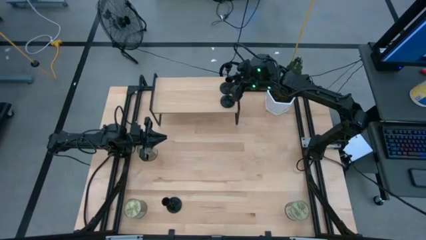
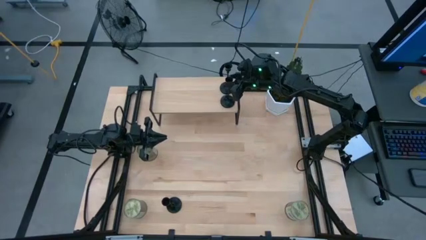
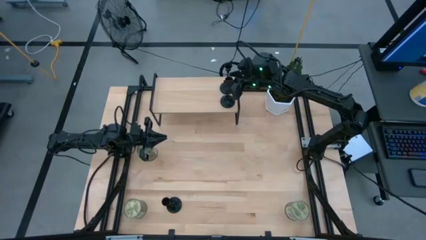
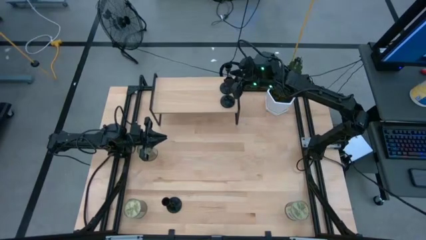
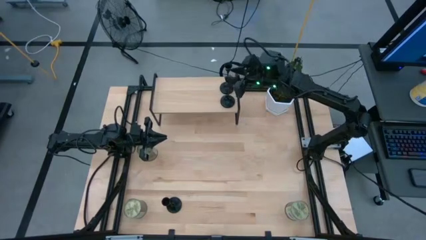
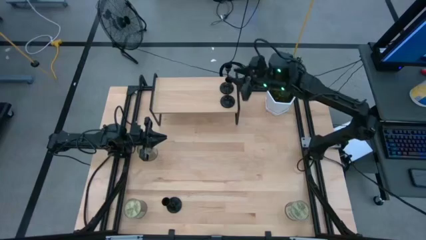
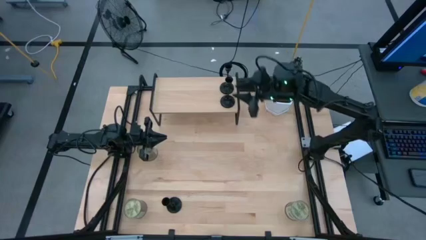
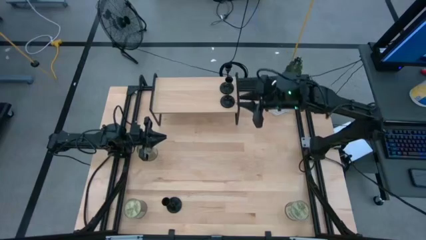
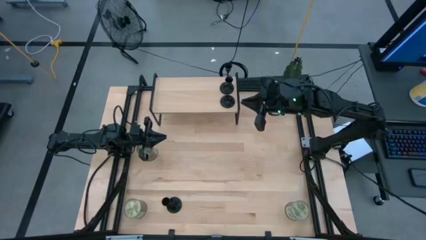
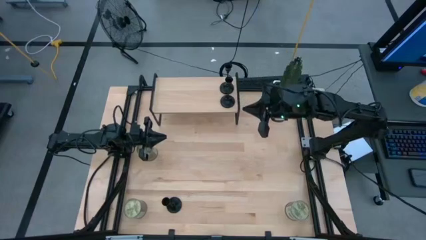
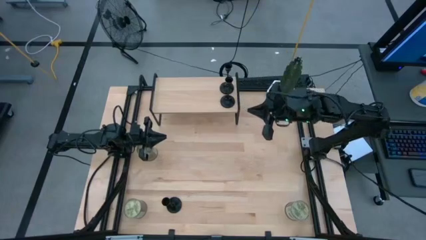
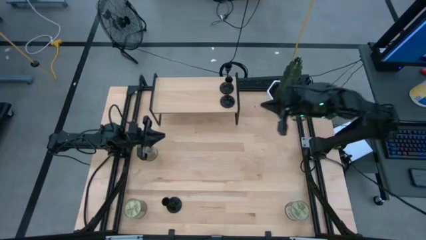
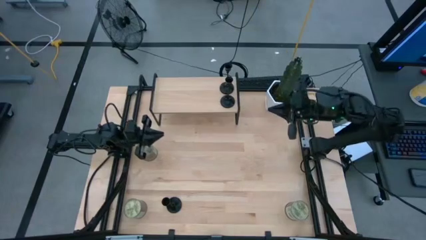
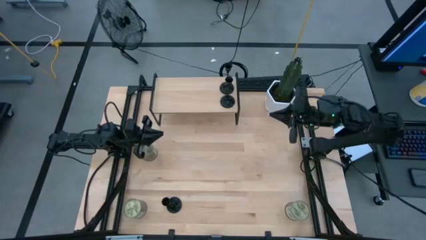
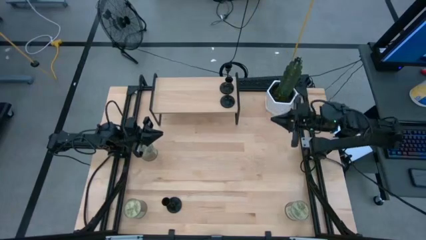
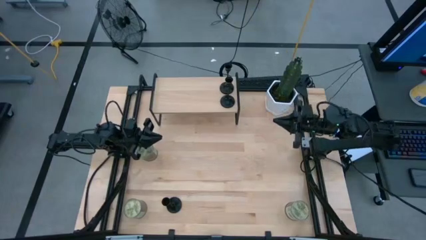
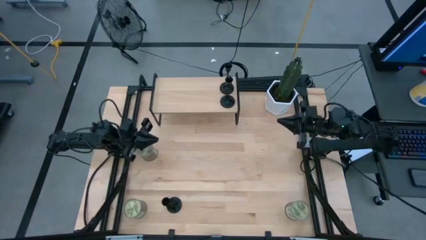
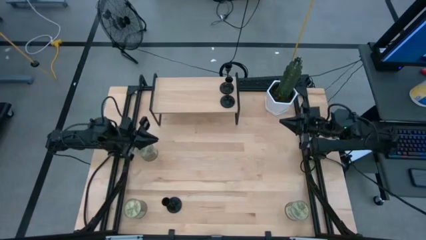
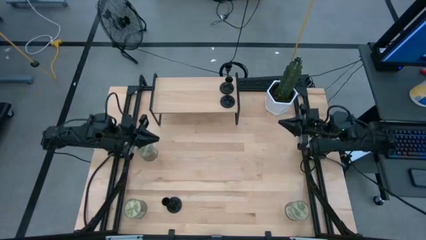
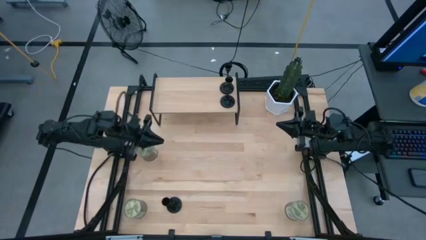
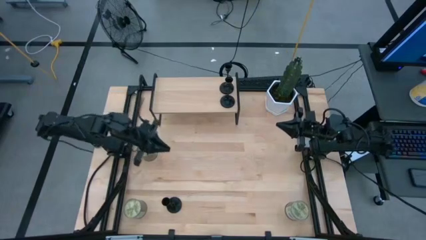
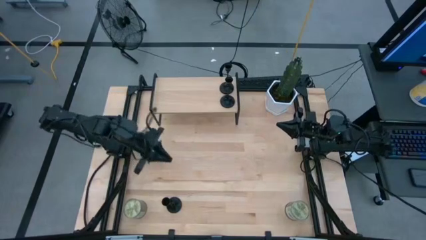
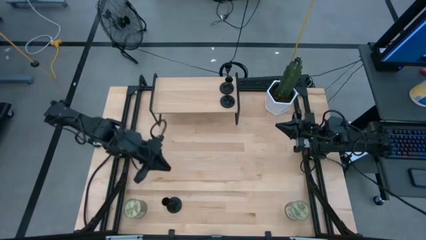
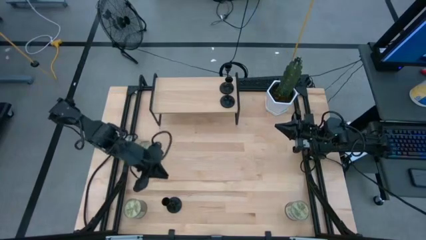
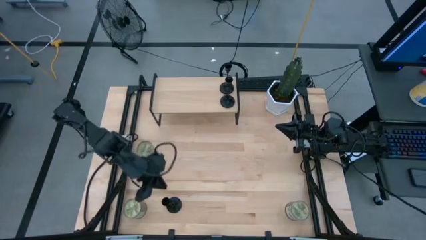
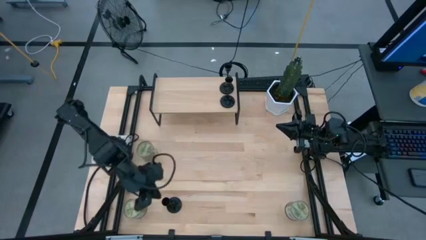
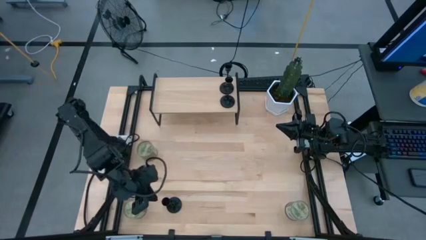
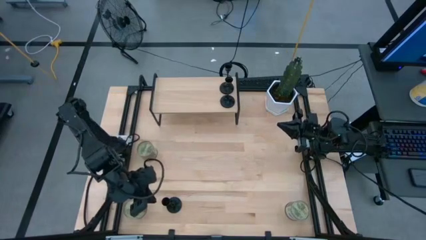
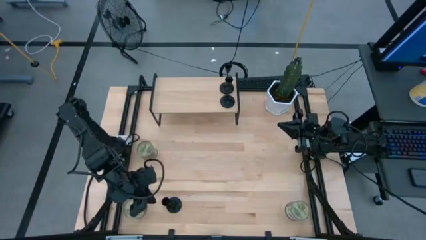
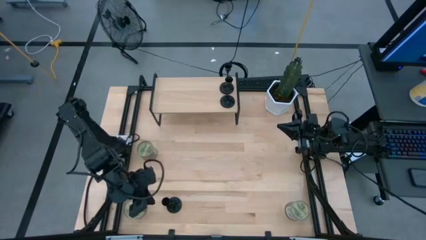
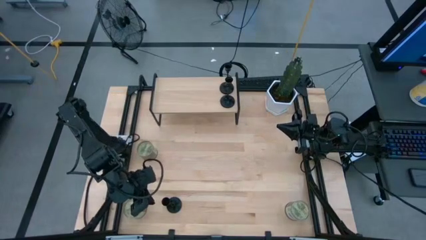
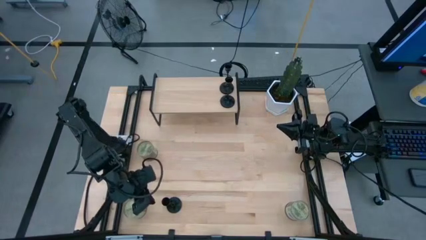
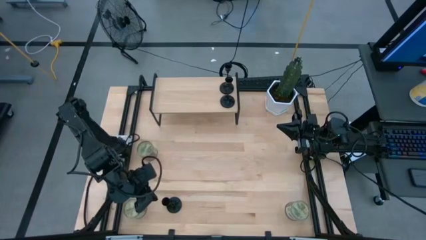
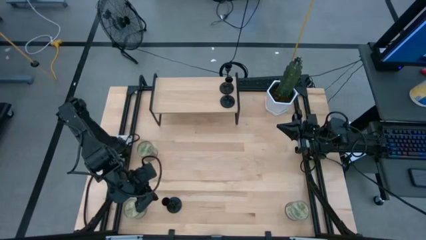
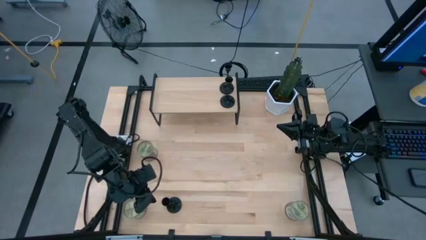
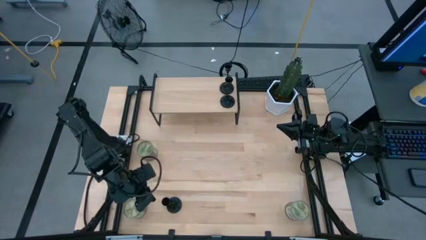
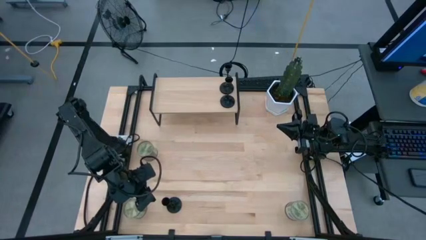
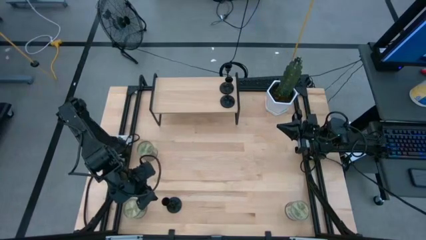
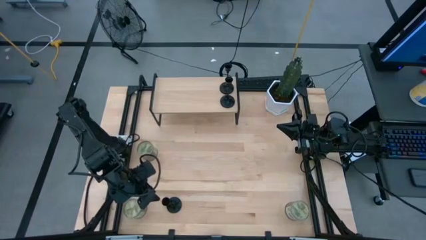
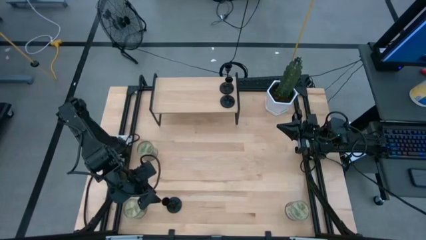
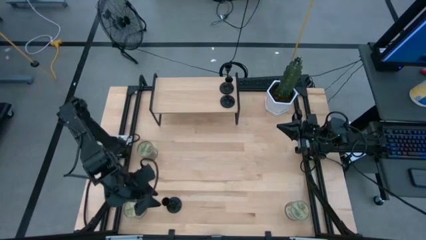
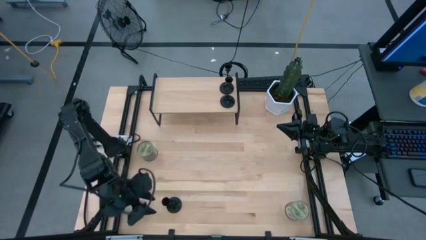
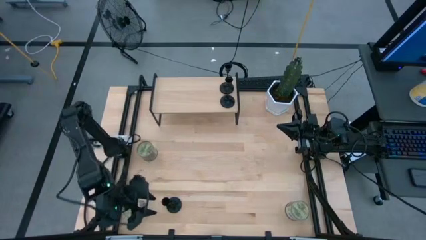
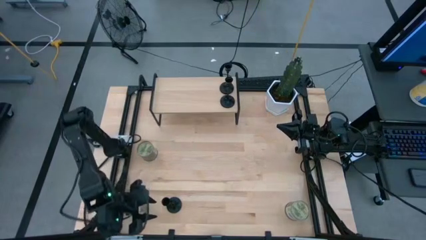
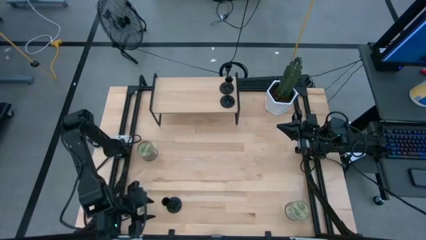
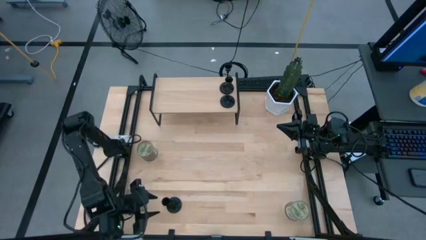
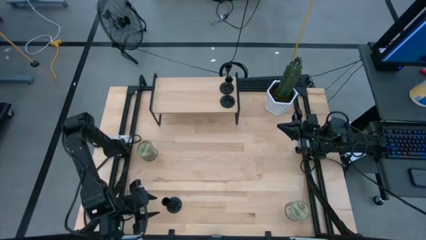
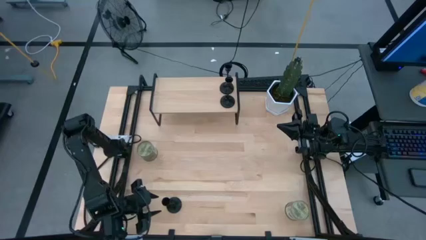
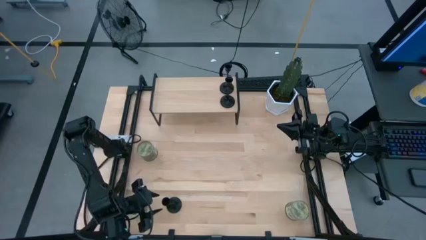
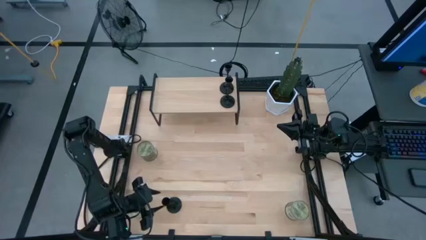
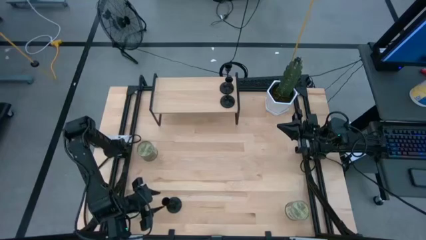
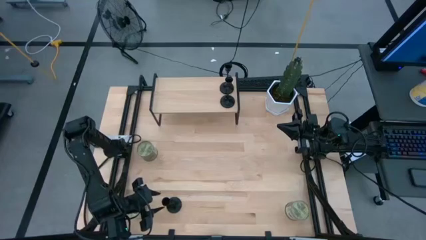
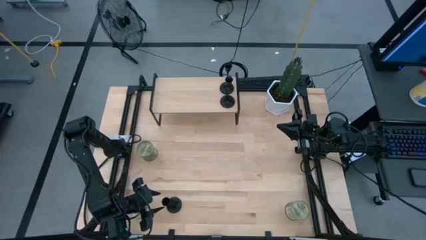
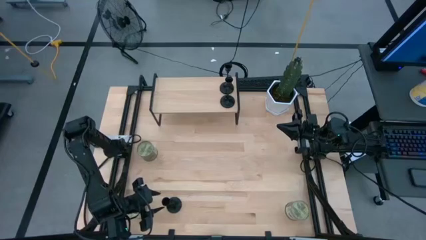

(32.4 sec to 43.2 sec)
Task: Pick & Place candle stick holders
Put the black candle holder on the shelf

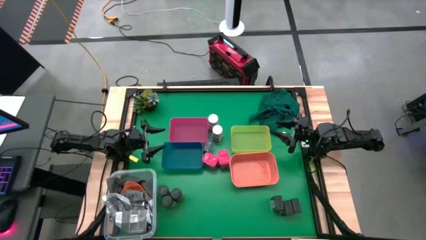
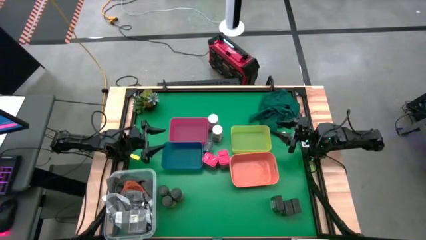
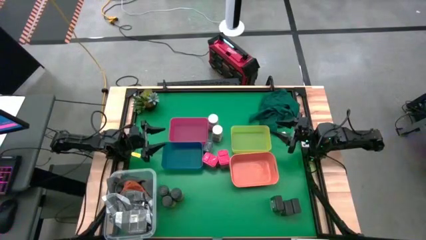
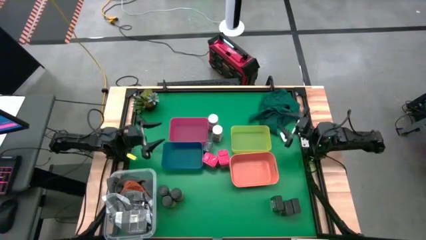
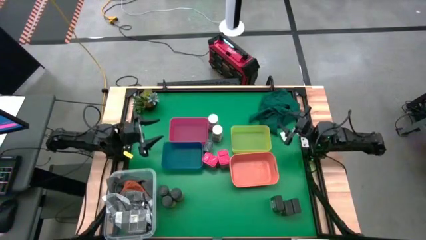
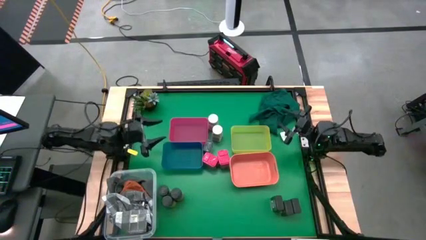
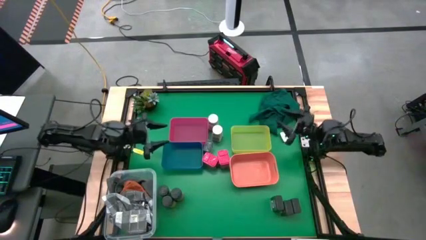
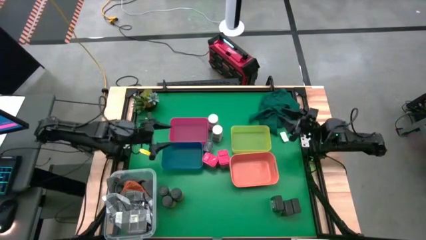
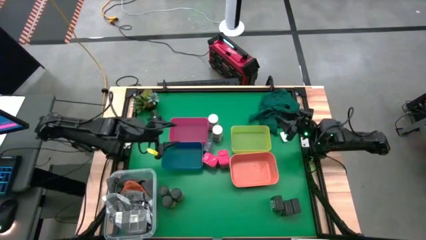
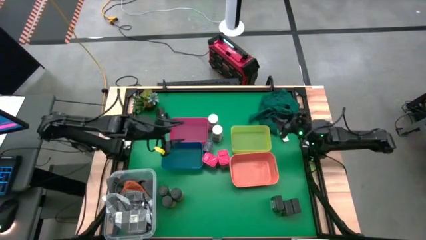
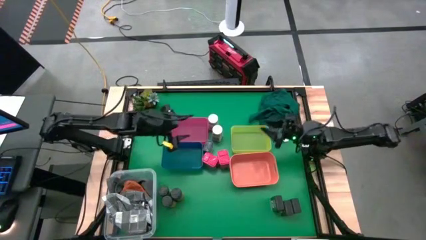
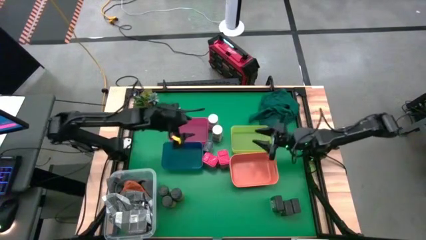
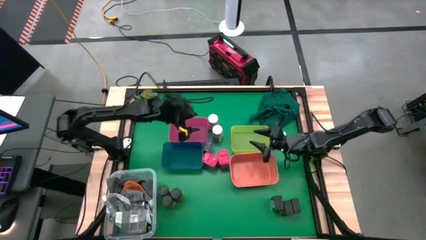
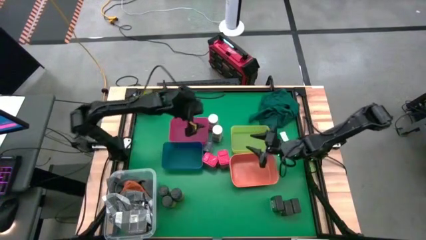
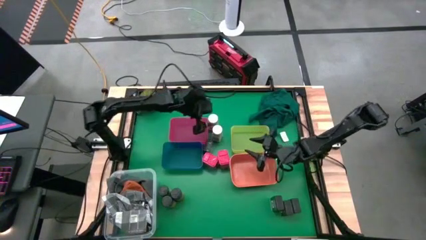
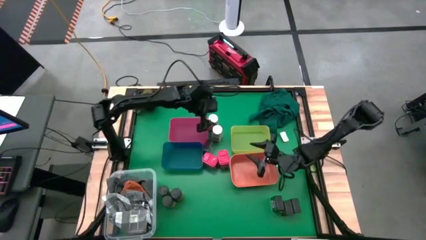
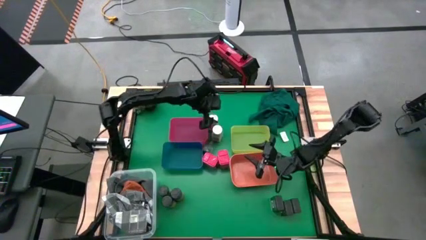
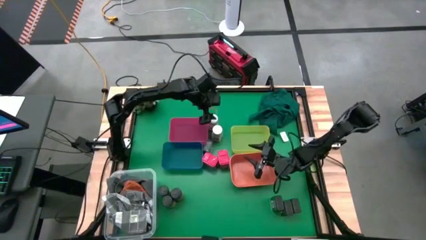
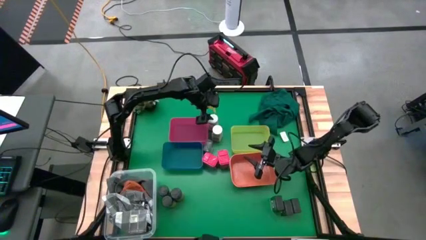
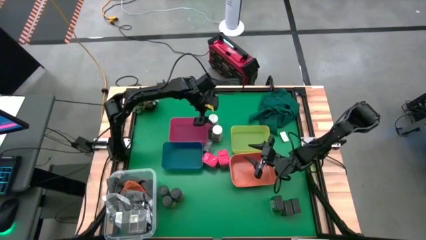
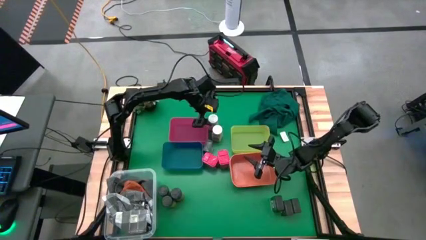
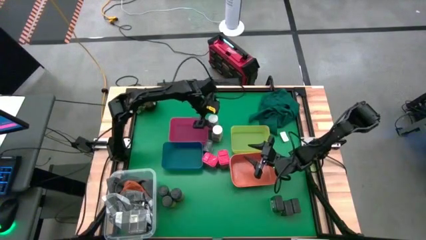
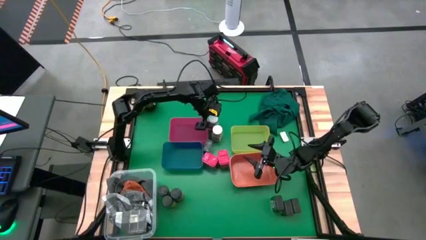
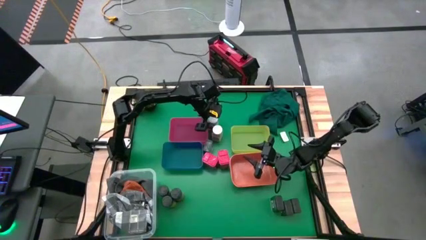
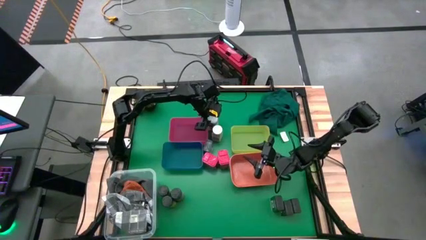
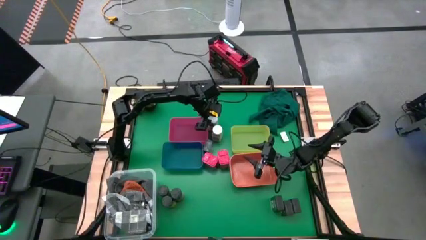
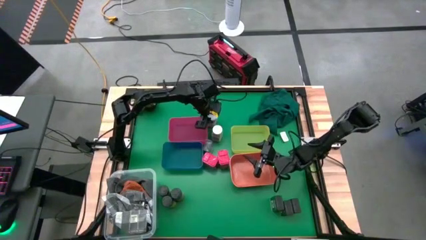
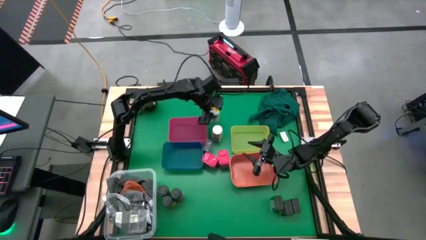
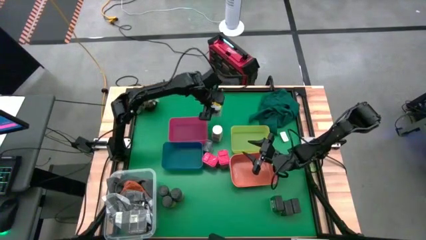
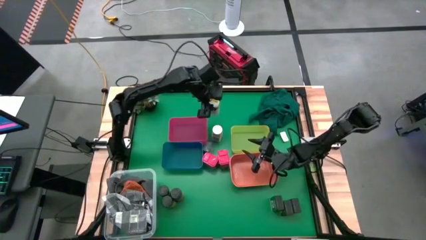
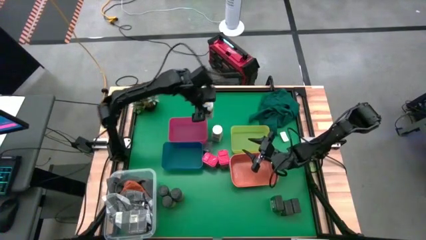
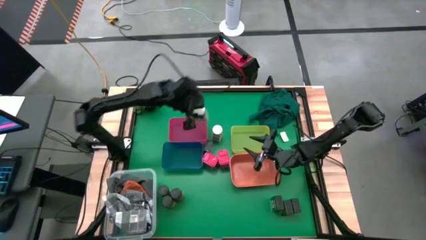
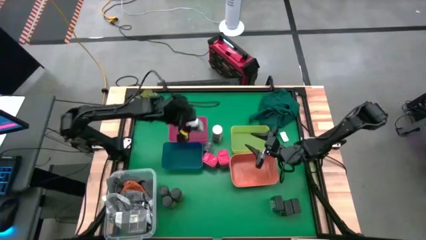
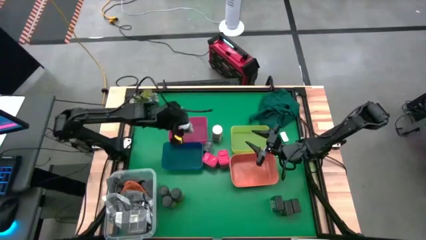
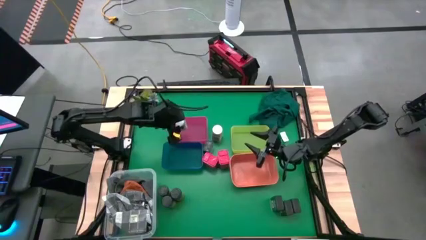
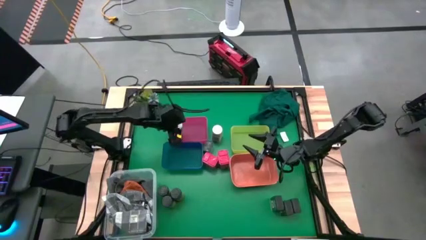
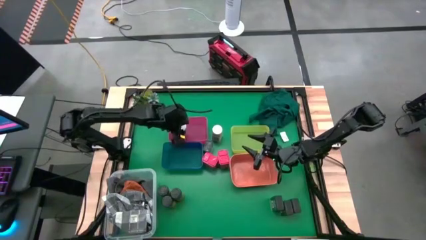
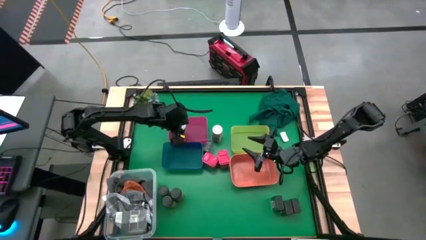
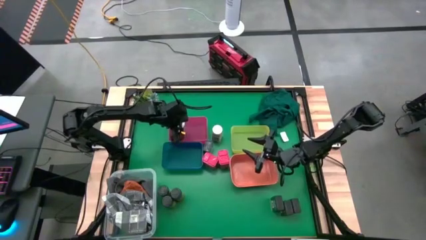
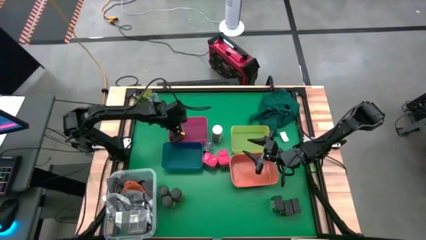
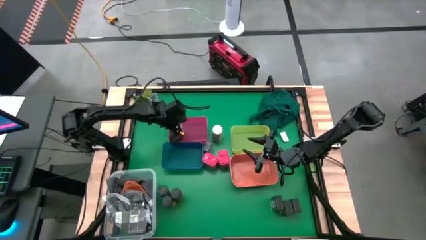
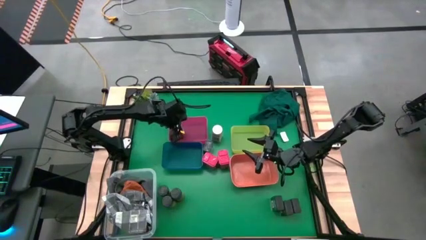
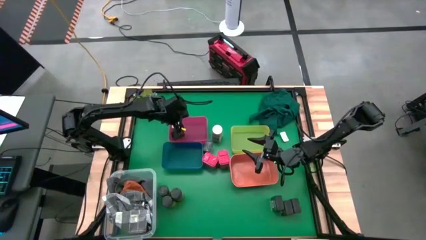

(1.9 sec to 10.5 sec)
Task: Sort spices by type
Put the top white seasoning bottle into the pink bin
